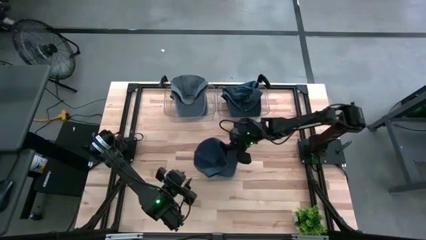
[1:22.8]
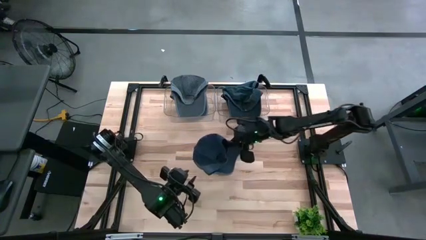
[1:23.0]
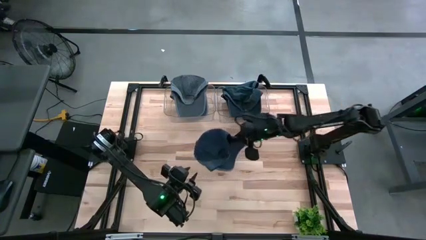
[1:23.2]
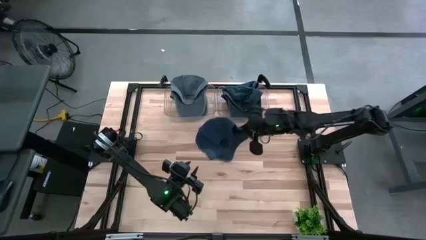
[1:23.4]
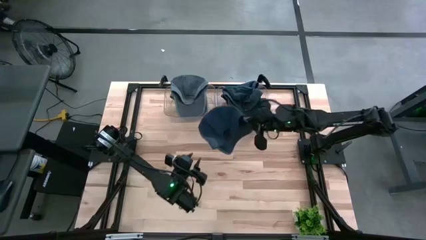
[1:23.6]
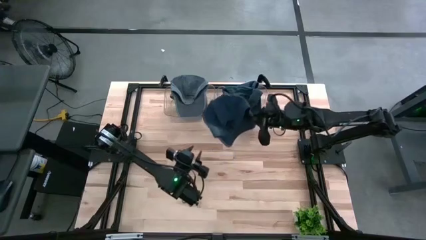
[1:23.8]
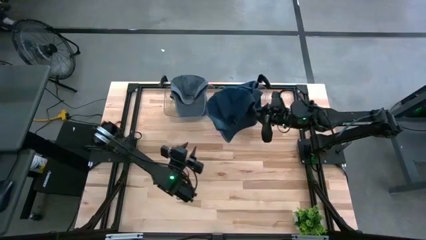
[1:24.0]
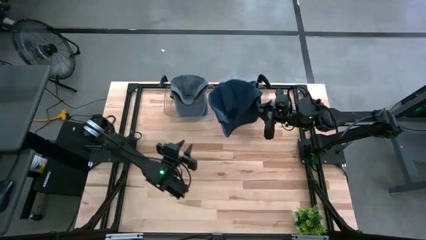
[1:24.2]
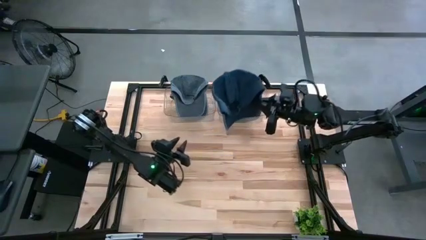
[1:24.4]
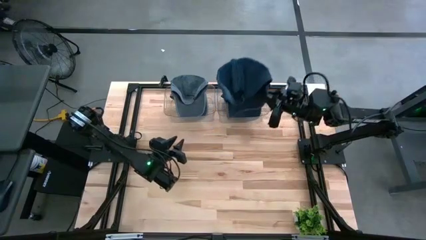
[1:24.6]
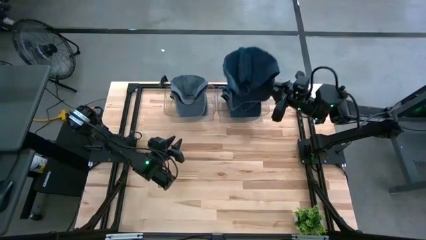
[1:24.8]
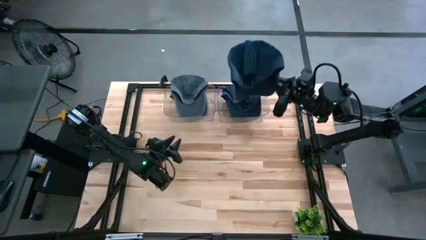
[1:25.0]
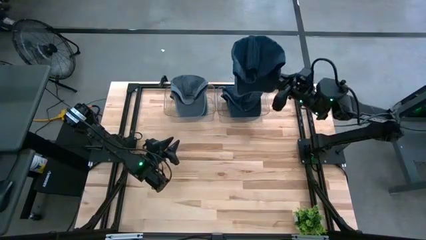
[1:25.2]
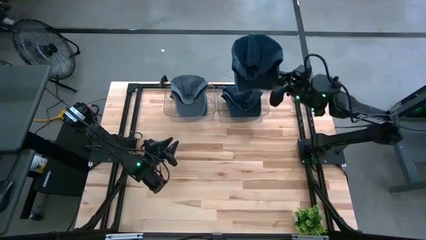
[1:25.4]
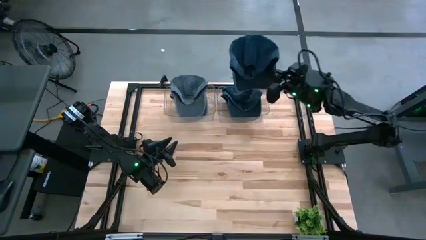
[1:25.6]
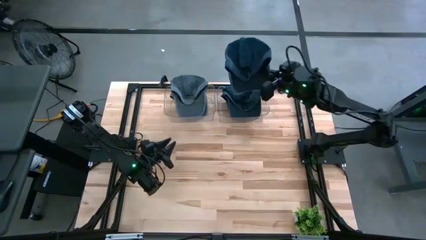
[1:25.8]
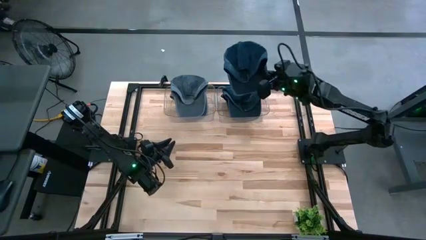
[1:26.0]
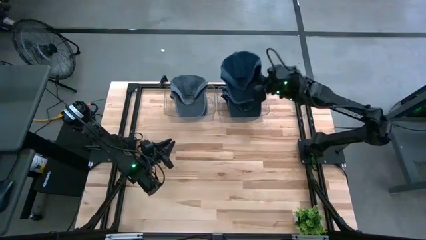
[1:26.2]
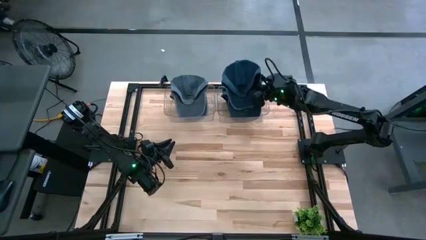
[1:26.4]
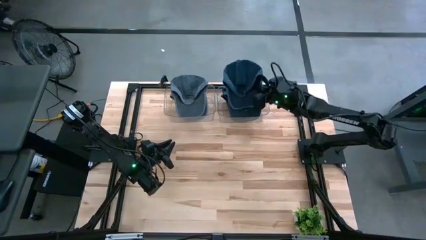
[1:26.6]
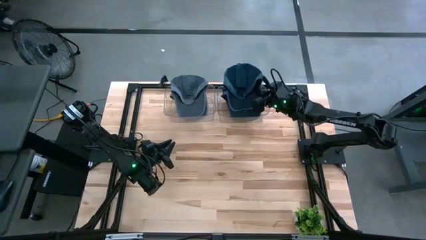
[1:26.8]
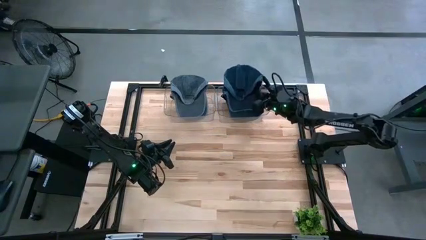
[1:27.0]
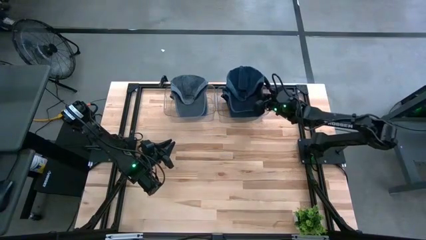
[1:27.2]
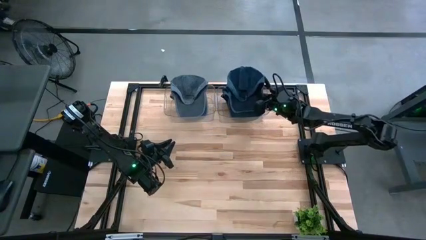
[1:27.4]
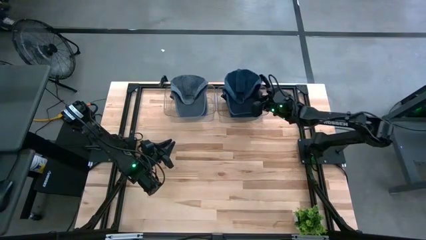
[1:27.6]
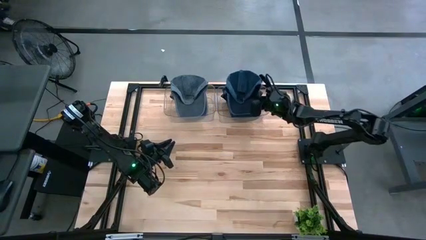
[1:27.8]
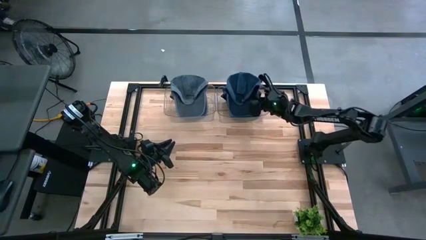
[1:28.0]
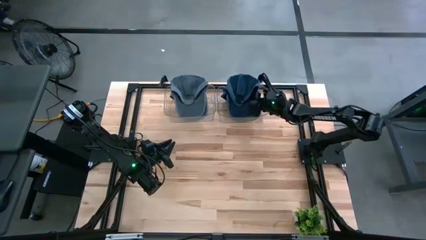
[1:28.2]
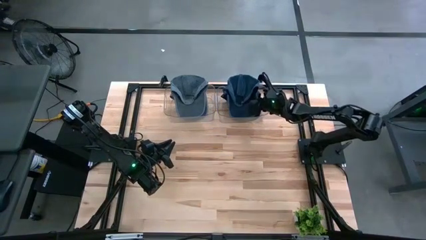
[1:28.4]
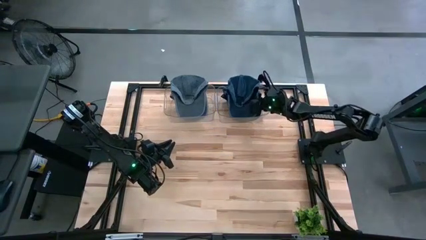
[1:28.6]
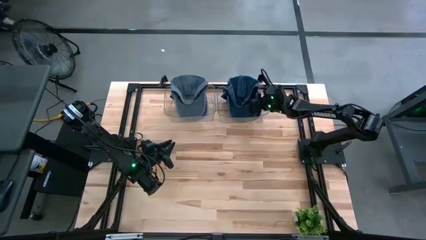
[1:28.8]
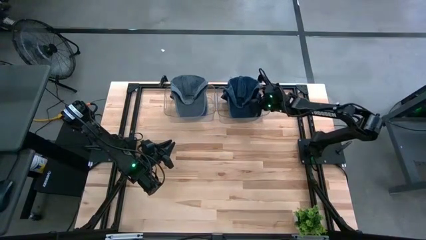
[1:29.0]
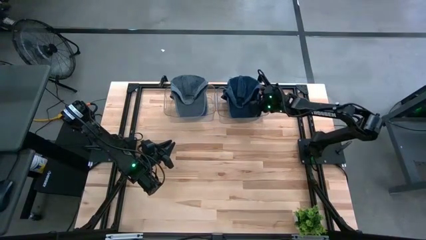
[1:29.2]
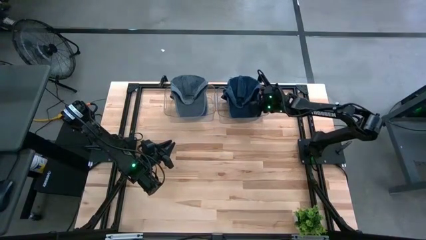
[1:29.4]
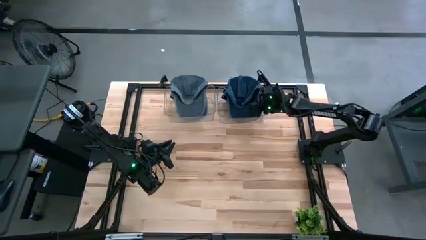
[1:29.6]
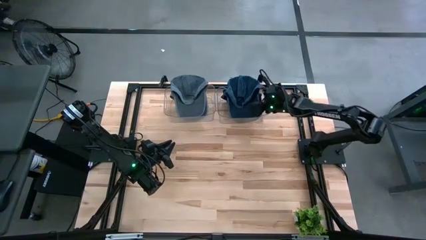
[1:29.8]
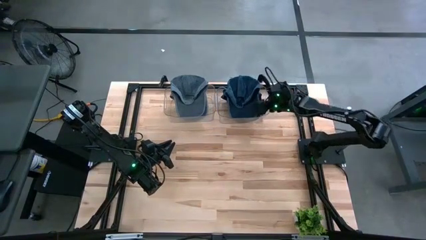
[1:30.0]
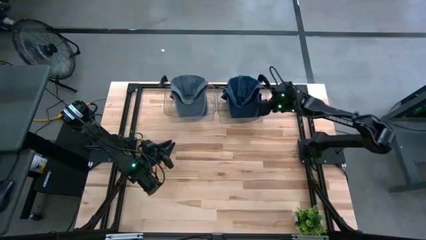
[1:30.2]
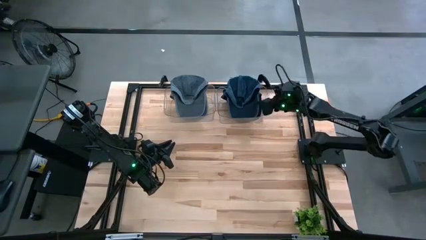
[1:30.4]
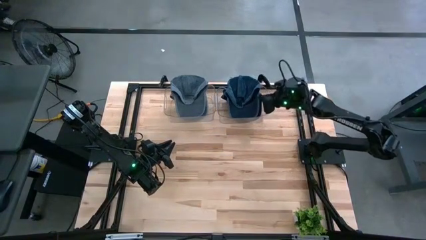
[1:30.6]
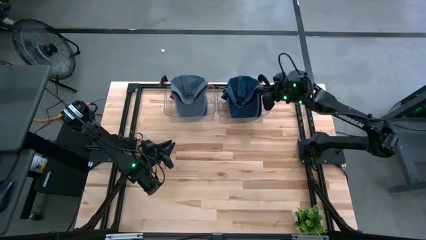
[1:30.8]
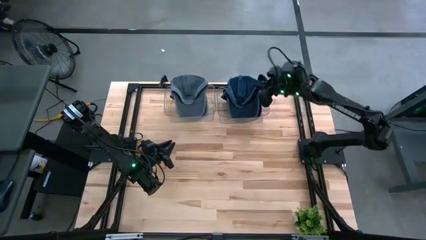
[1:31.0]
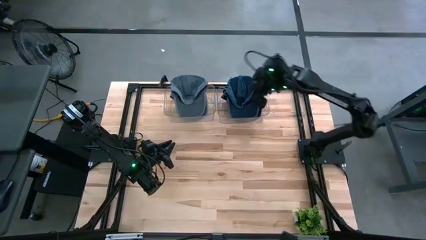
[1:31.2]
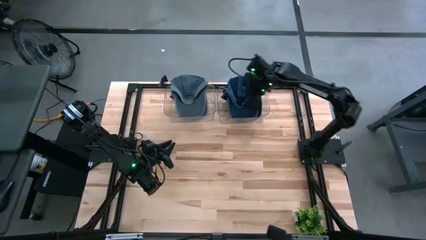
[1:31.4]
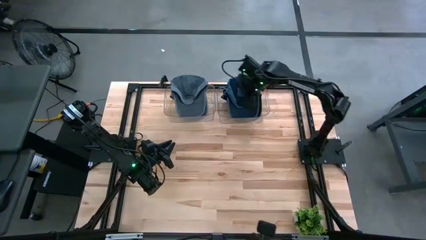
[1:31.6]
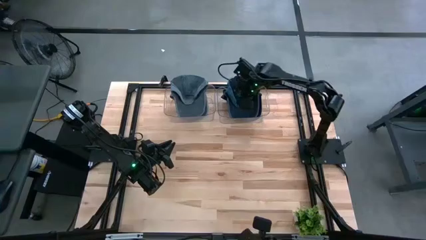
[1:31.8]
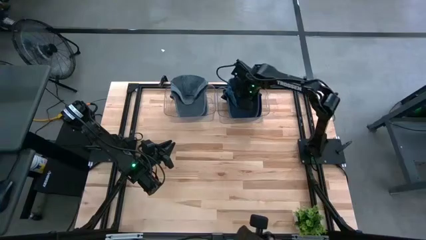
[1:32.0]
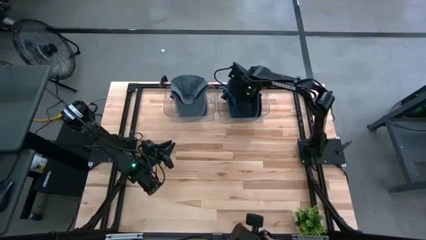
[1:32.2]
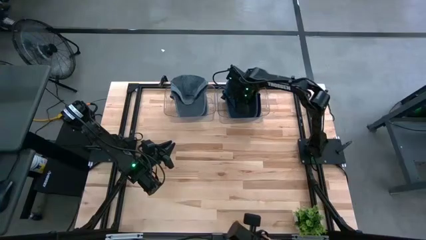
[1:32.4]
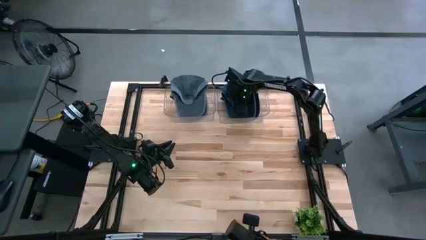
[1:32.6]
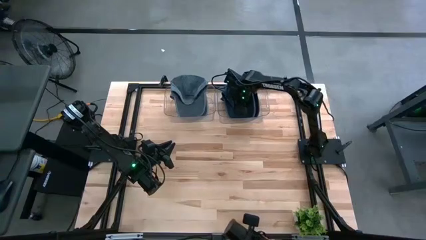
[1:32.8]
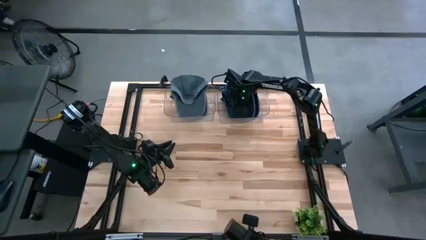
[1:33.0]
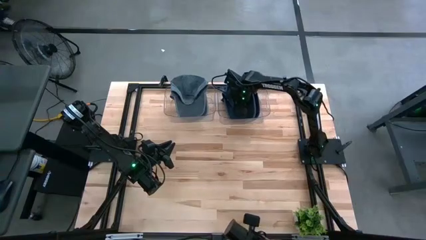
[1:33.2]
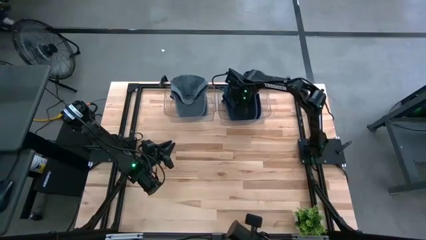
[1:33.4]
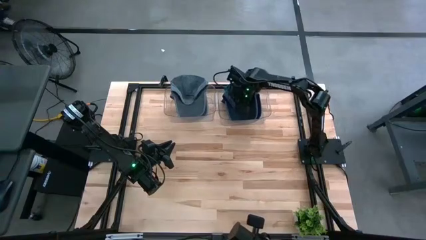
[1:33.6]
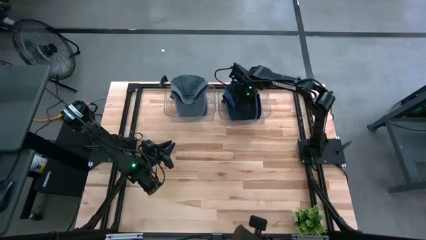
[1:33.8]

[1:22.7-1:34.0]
Task: Pick & Place hat
Put the dark blue cap into the right transparent bin
